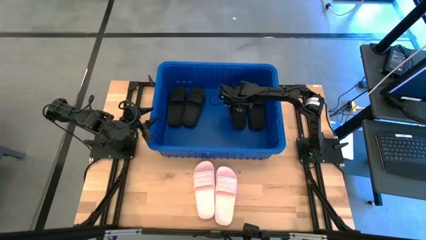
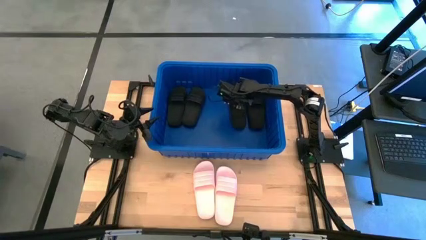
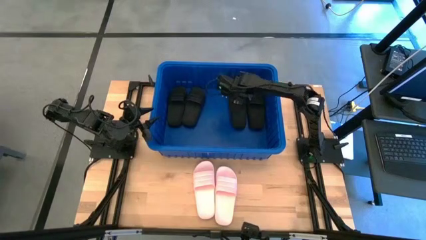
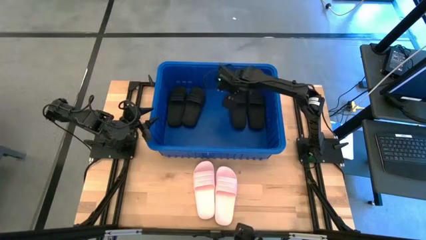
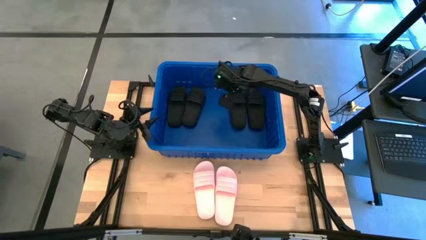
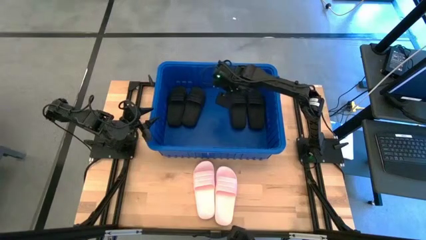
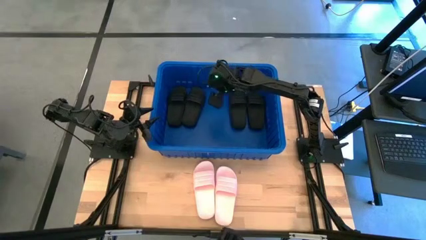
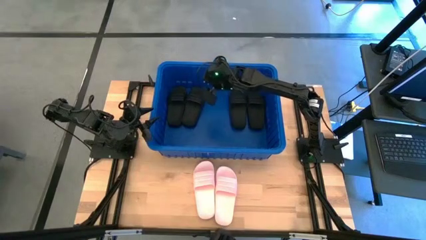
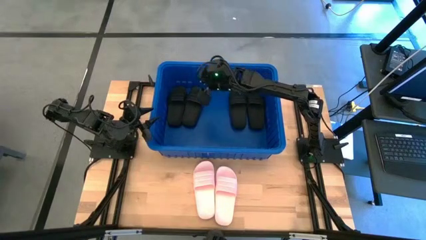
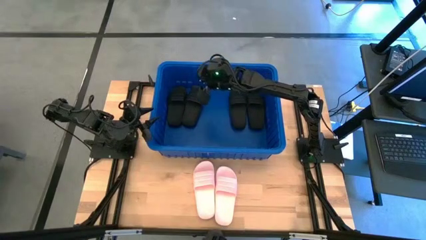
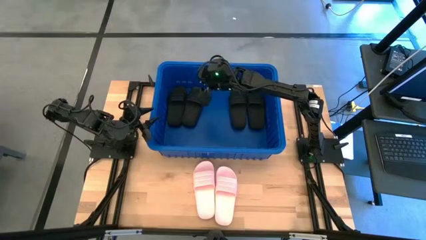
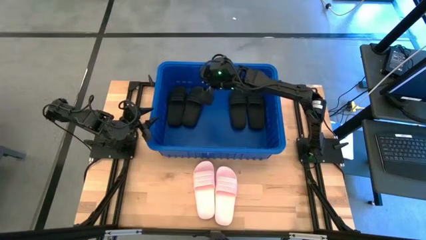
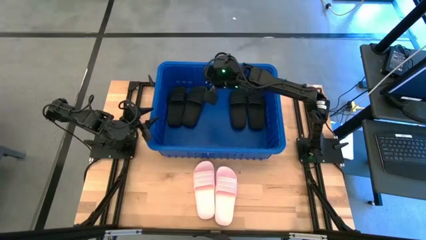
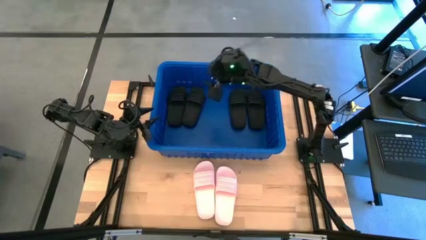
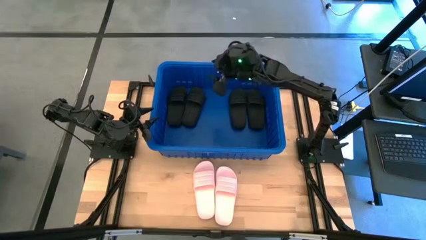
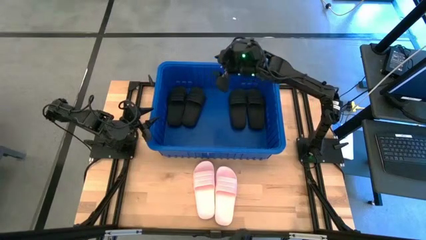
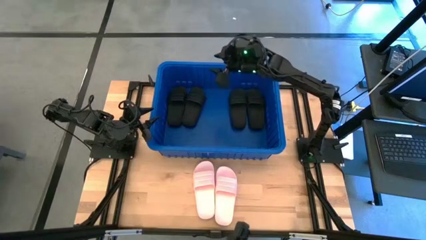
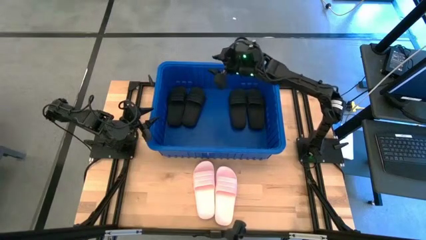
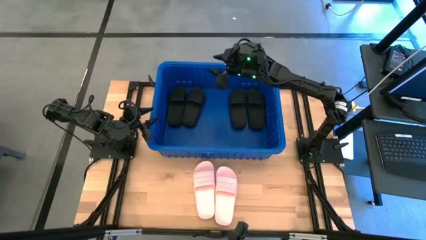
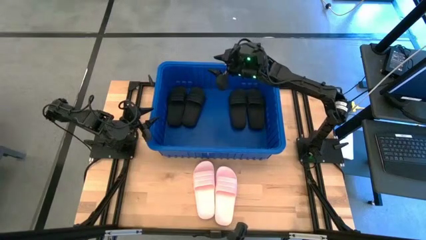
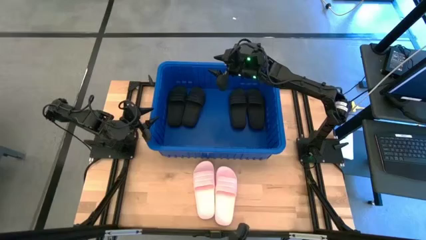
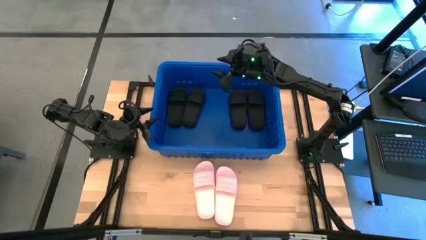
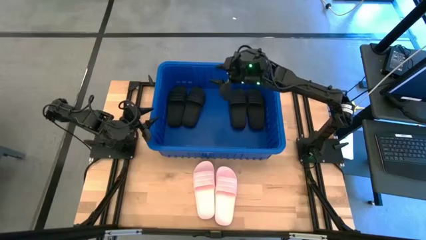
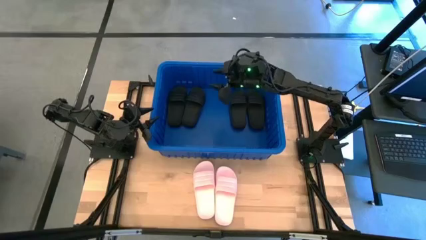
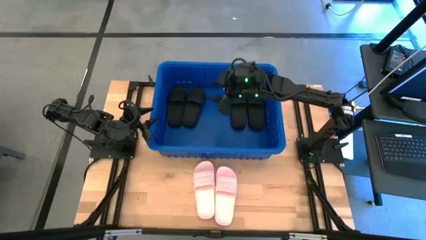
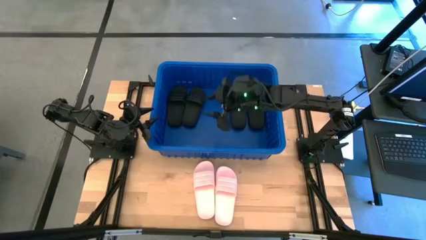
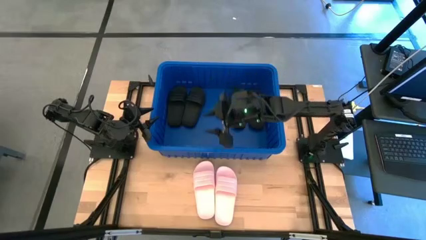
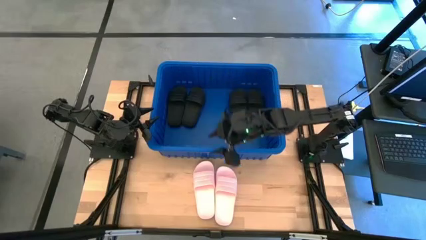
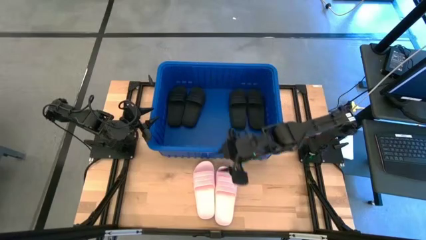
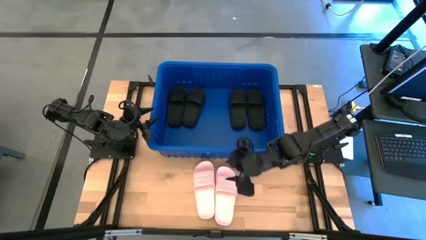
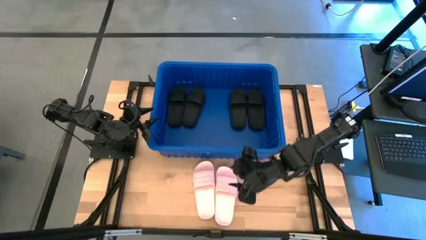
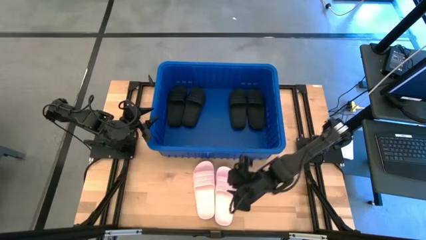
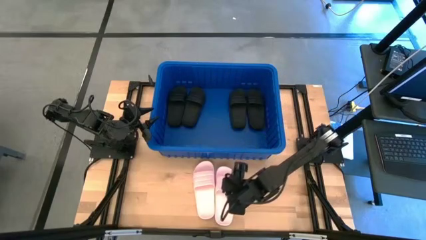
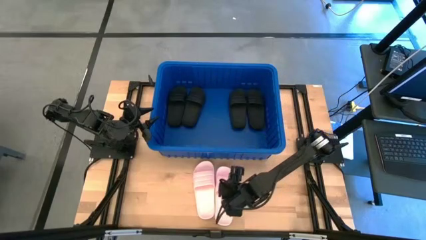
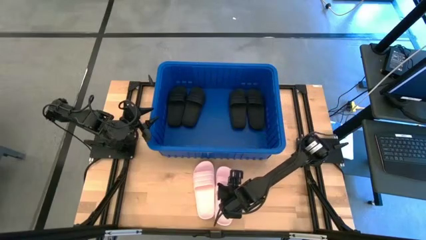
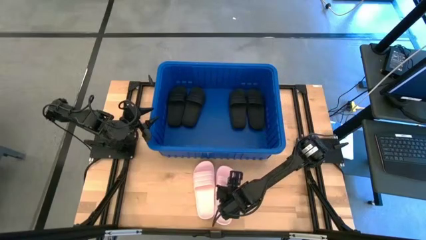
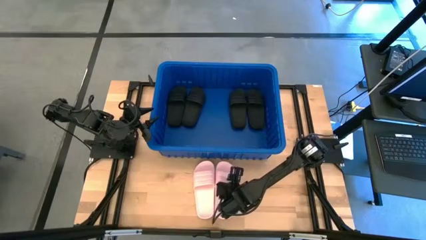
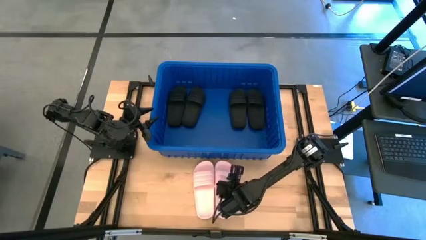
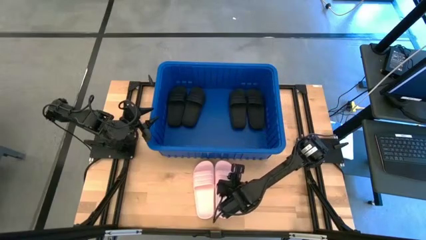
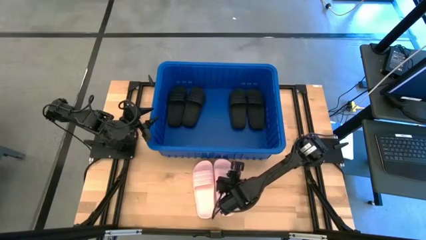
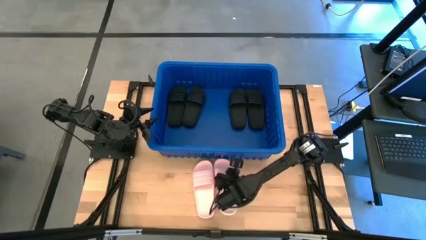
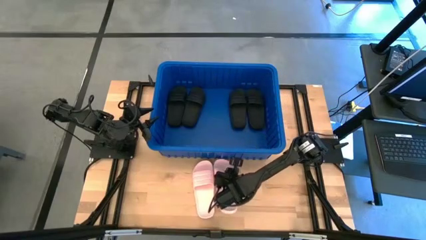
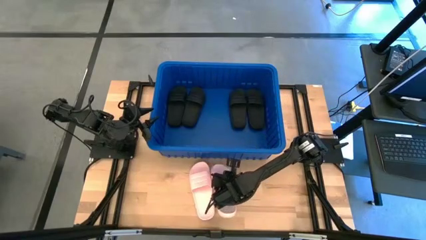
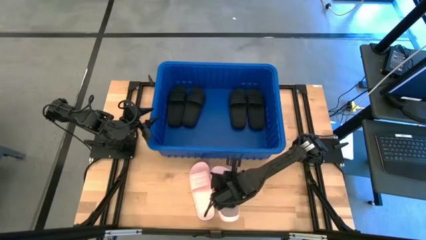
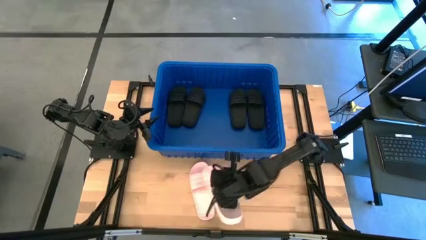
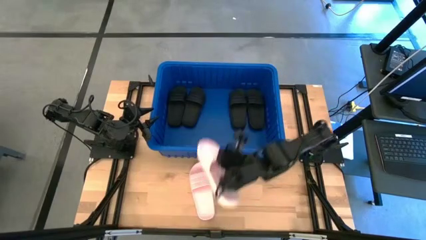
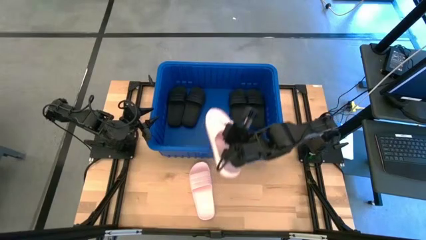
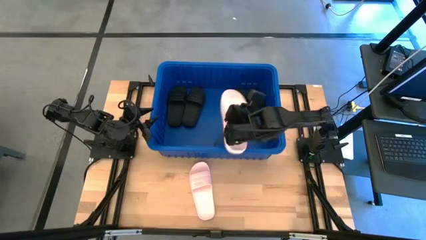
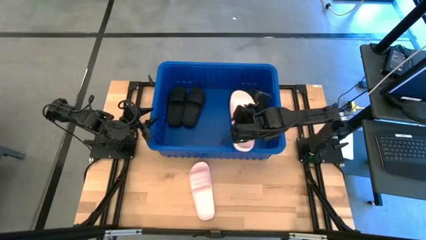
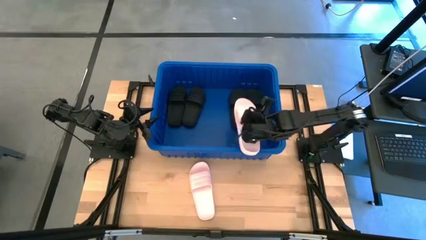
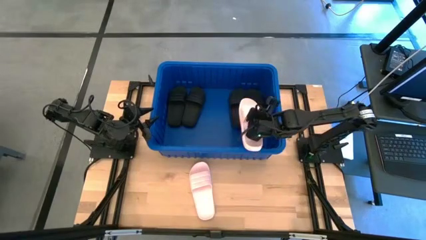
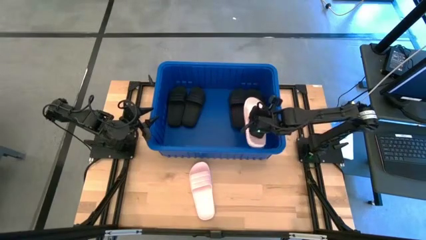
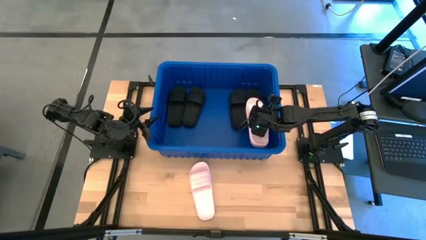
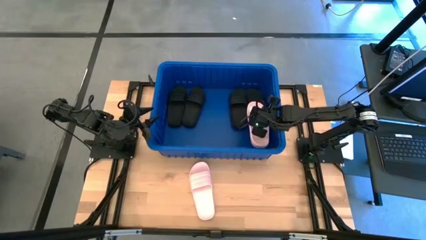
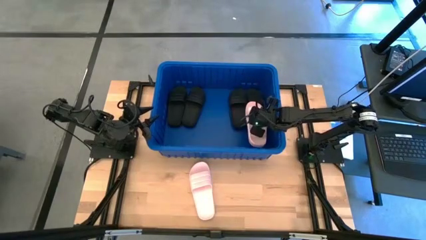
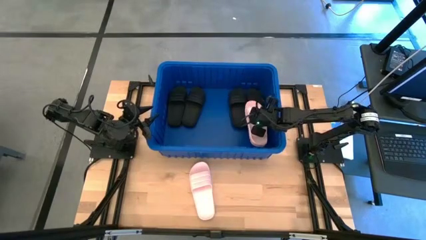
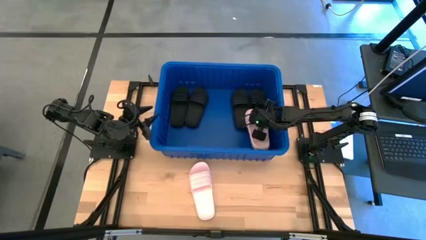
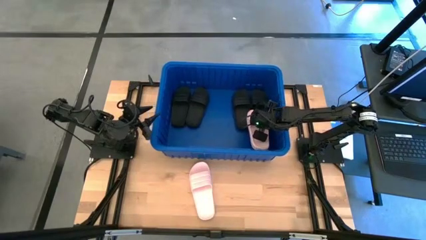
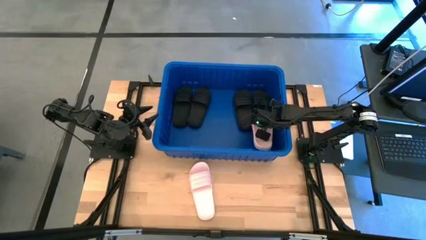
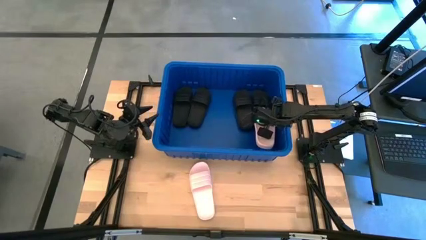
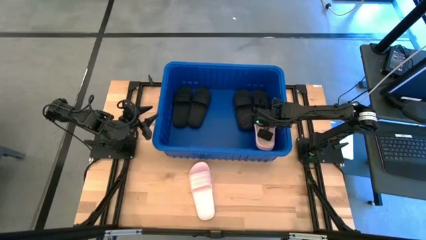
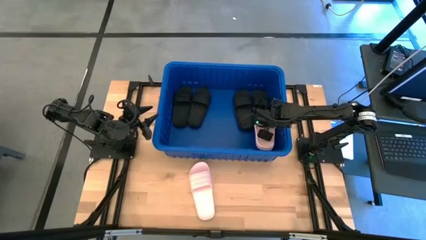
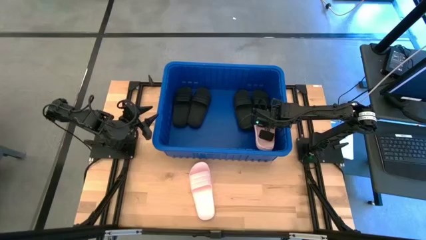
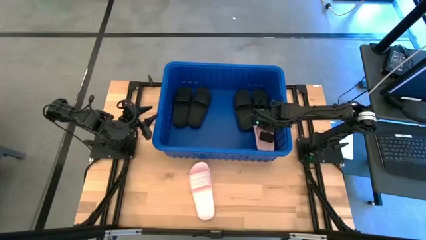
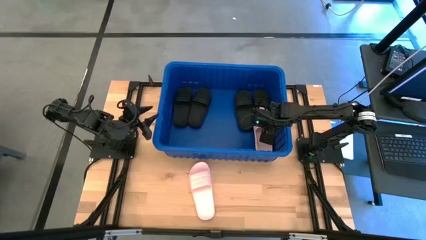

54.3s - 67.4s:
Task: Pick and place slides into bin
Put the pink slide into the blue bin
